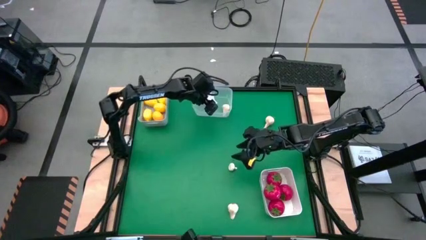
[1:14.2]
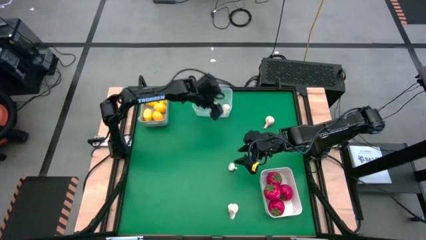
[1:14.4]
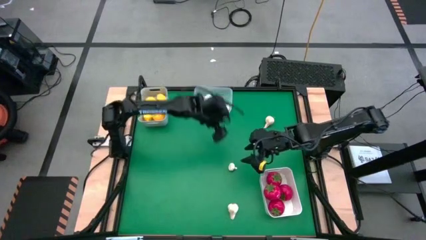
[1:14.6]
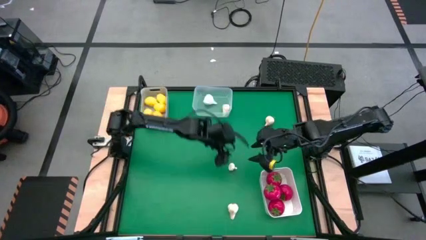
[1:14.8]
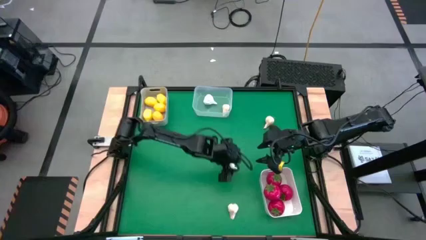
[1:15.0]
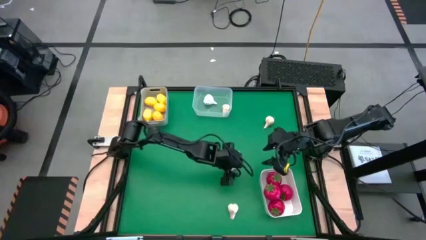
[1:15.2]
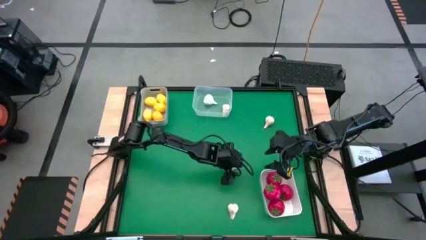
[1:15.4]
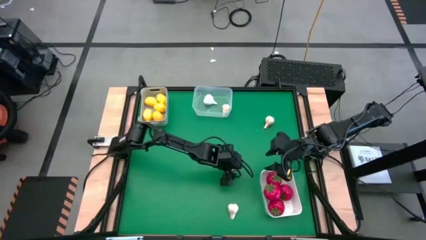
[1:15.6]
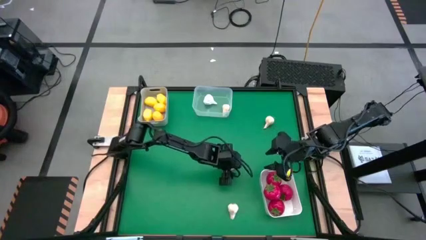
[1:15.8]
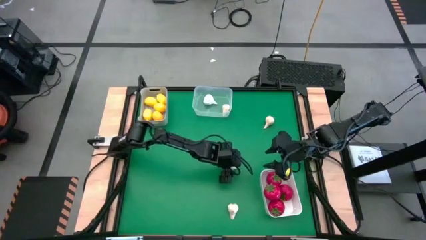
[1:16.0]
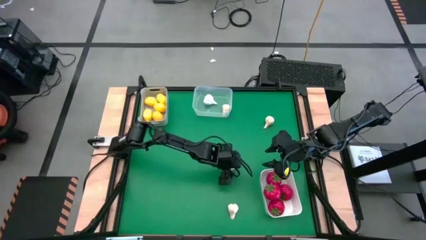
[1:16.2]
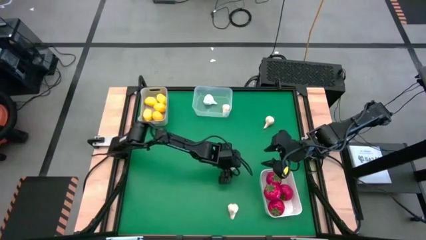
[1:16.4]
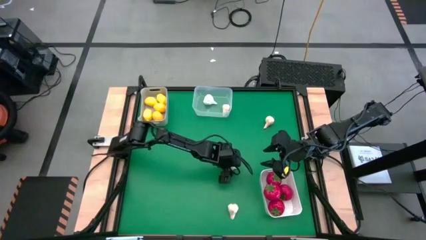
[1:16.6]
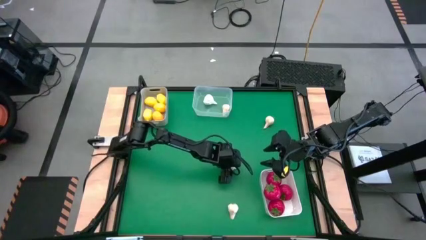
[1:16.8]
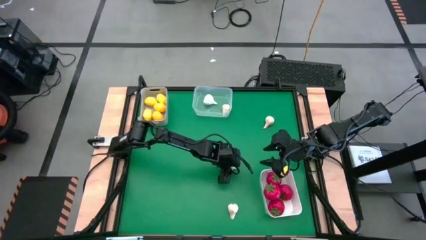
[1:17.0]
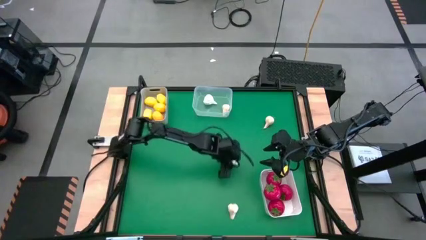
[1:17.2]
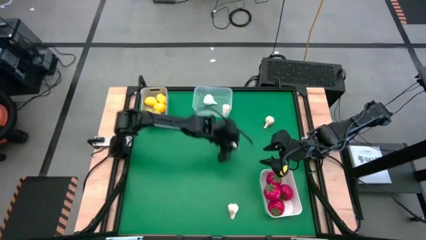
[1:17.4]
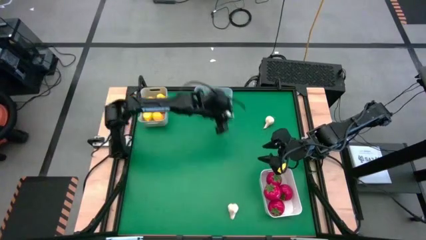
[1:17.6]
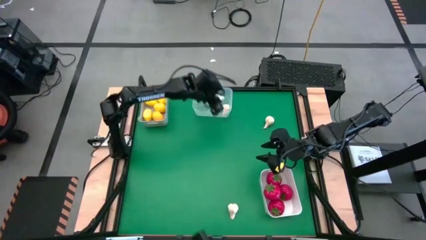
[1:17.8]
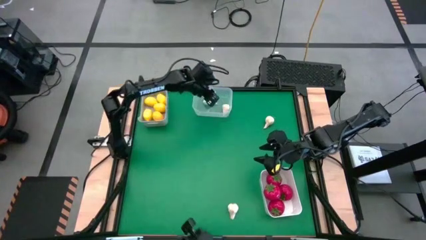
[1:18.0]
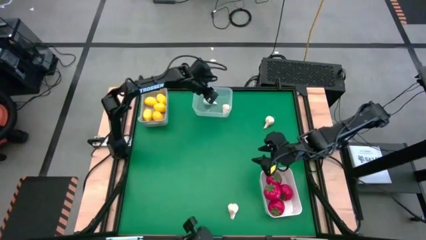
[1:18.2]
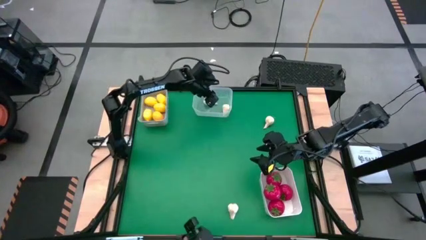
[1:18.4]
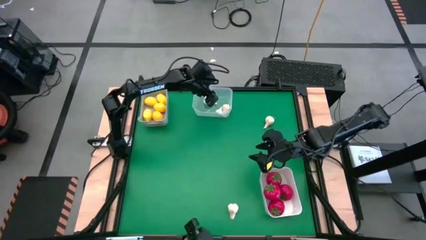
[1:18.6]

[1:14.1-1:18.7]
Task: Sort produce into baskets
Put the garlic into the transparent bin

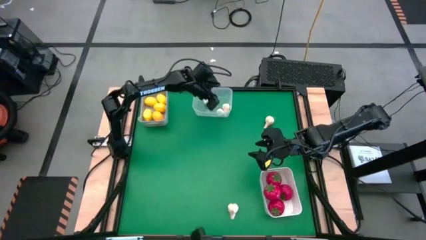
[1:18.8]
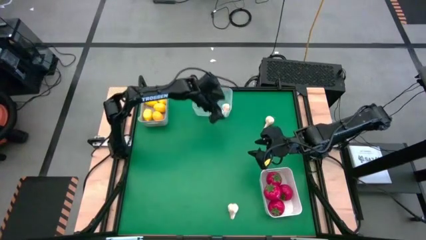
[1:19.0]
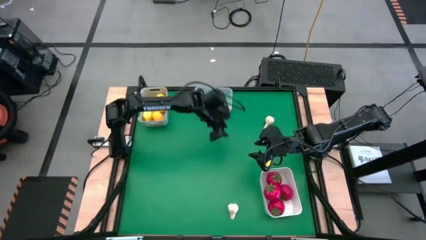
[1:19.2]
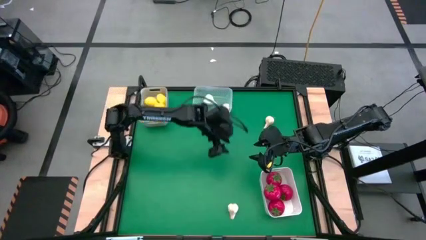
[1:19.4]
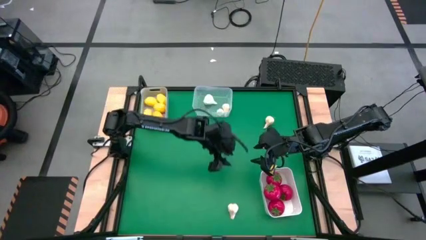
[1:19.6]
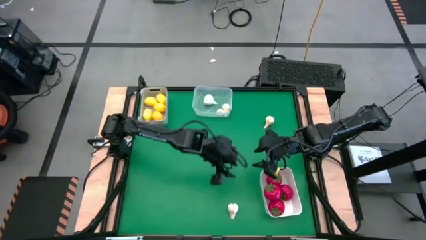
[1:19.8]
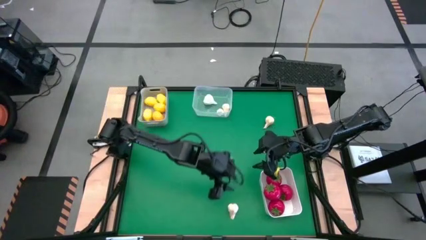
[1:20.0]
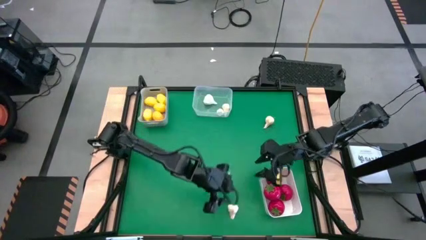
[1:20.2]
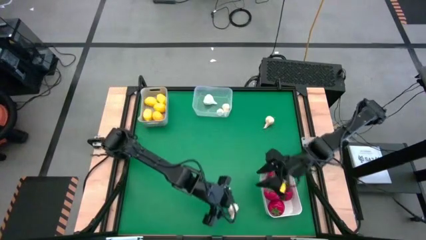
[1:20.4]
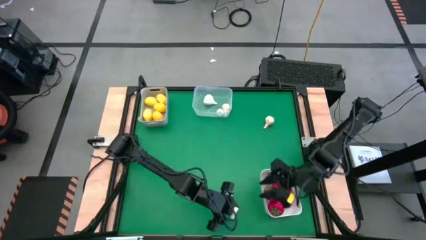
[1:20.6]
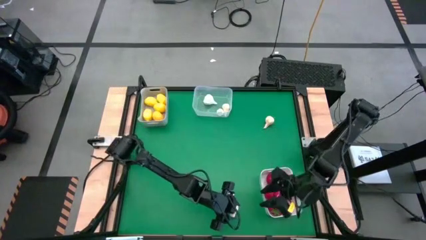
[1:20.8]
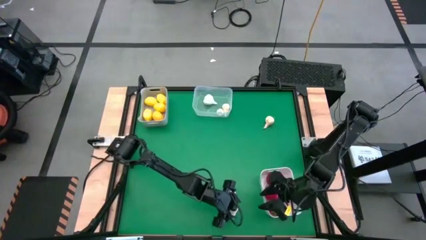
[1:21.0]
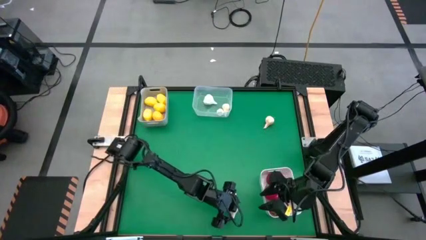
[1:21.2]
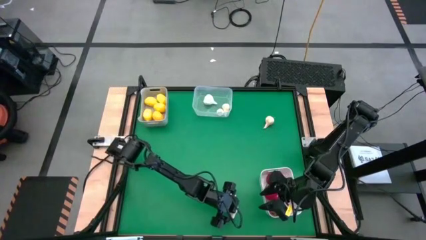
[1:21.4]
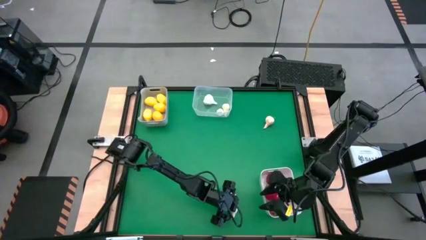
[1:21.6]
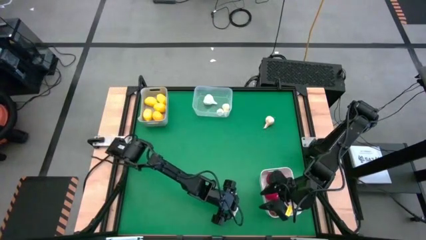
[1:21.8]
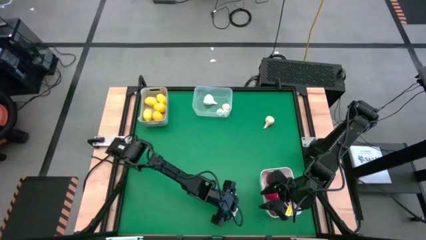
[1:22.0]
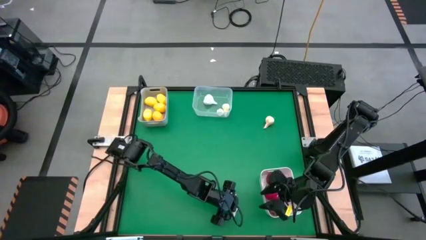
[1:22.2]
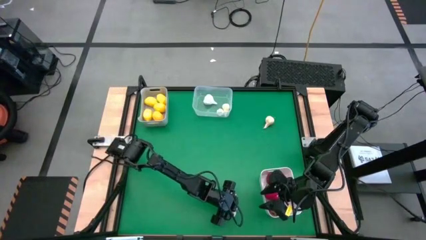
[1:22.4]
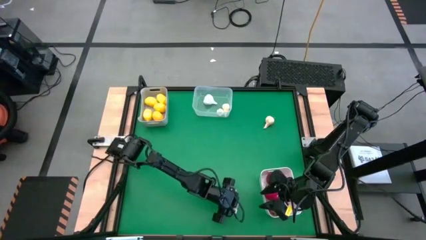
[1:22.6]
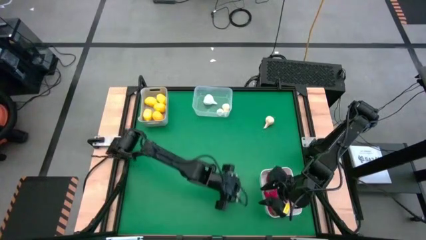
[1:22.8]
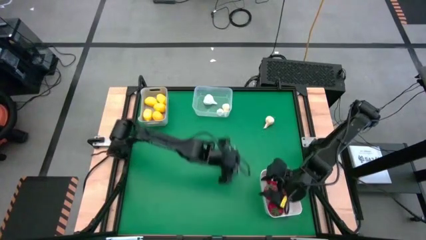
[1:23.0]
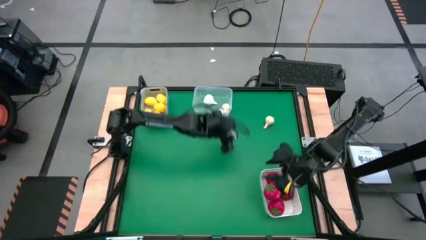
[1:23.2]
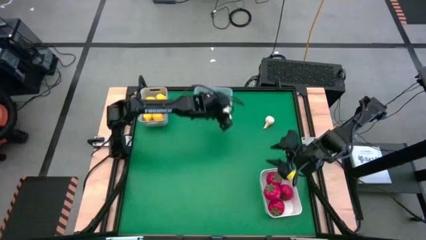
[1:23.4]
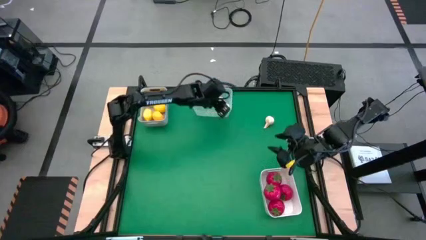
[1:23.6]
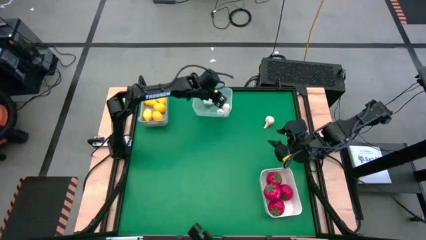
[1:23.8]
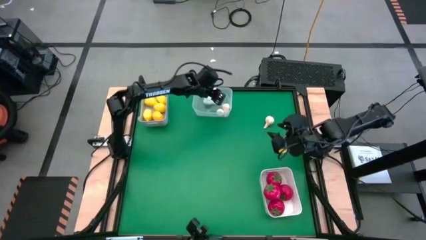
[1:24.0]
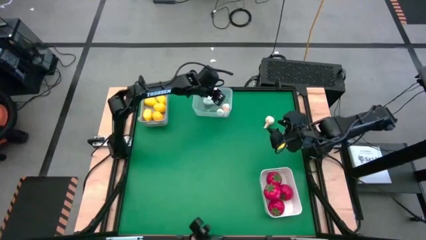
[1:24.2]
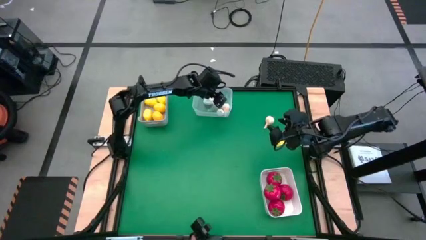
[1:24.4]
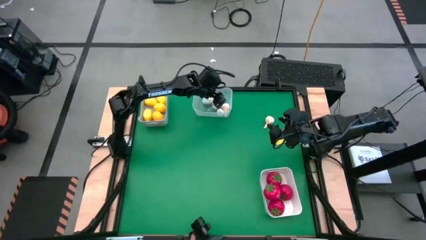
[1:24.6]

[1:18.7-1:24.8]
Put the garlic into the transparent bin

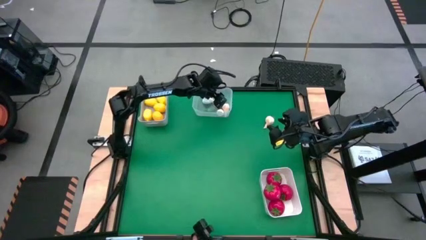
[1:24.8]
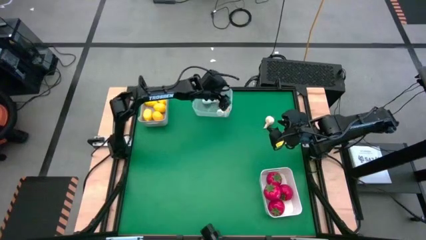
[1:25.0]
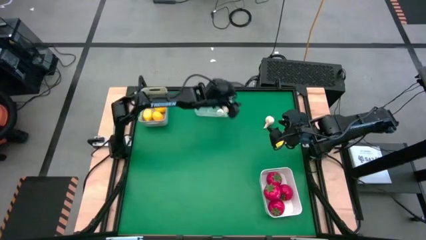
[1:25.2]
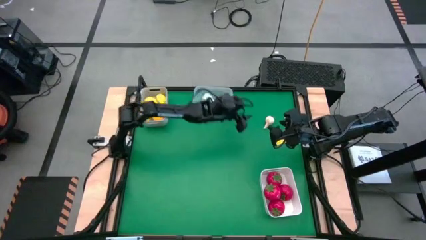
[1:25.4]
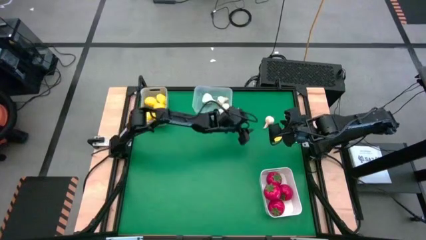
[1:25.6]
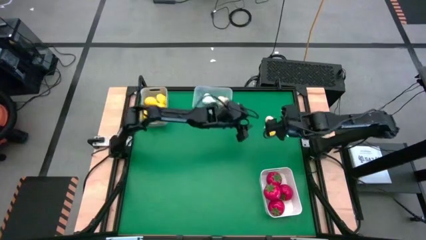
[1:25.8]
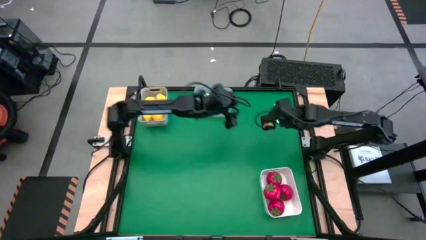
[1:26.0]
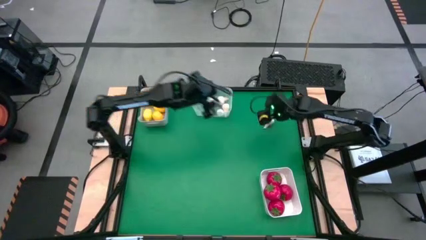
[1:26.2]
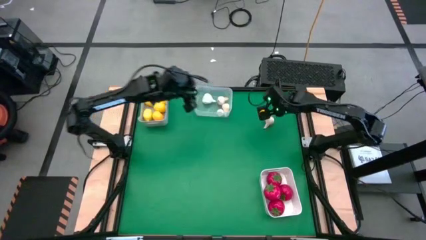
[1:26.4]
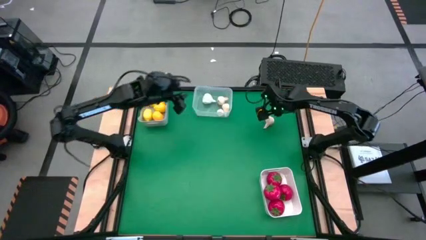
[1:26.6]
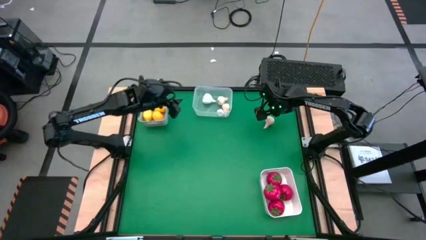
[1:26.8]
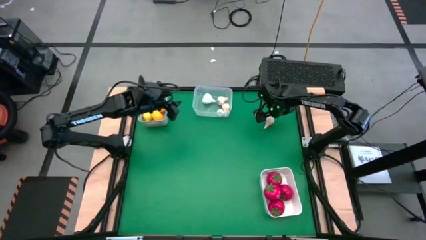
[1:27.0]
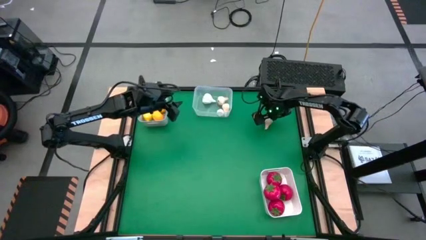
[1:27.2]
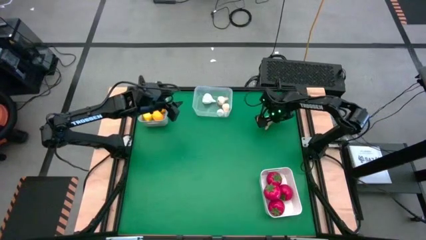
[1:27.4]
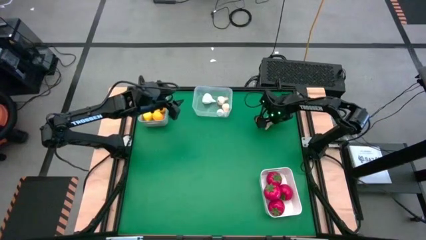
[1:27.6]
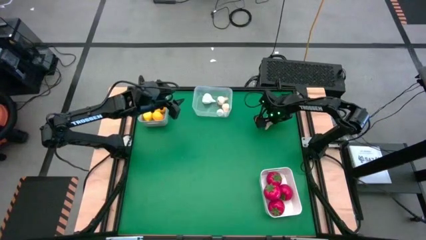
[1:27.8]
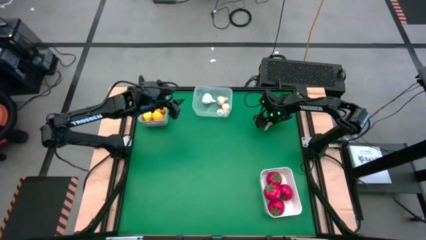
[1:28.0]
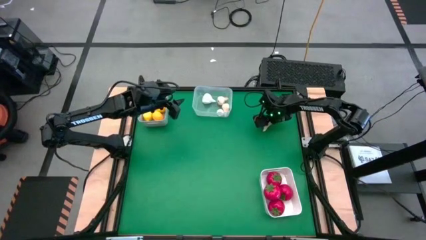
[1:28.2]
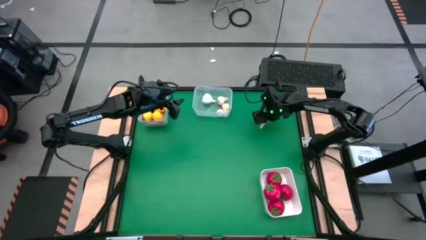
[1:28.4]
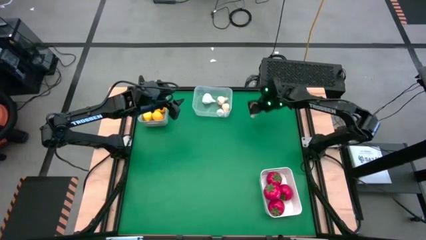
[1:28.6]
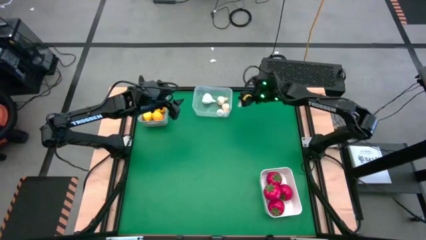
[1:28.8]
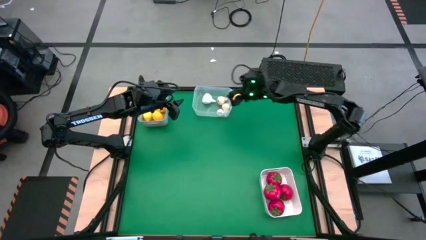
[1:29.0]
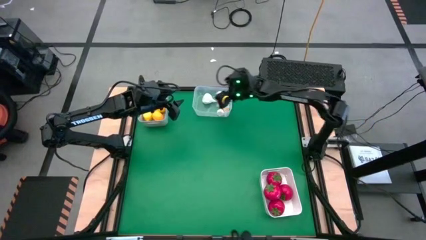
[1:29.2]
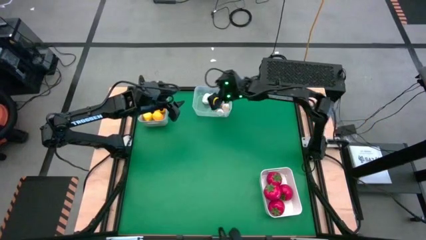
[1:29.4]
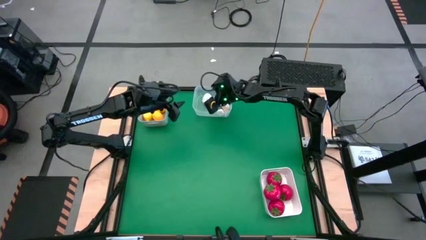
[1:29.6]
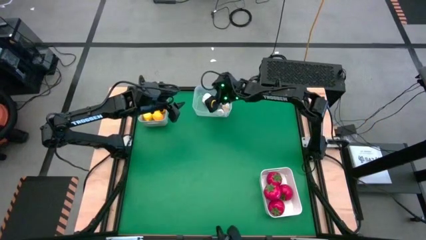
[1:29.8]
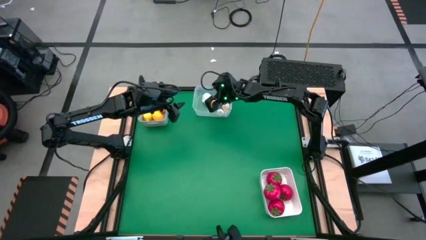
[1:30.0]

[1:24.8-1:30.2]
Put the garlic into the transparent bin
